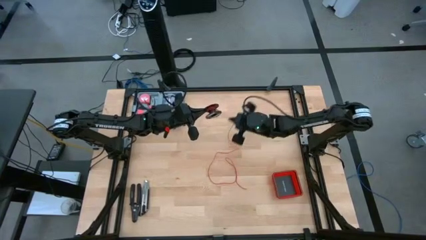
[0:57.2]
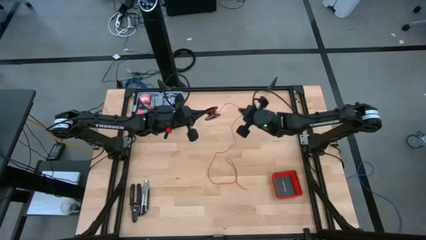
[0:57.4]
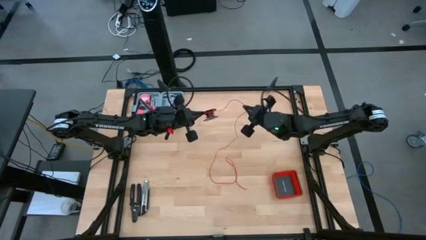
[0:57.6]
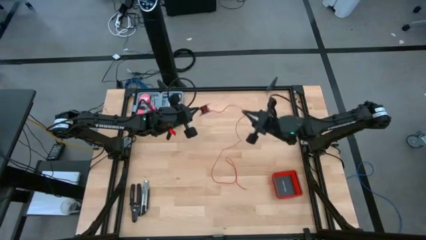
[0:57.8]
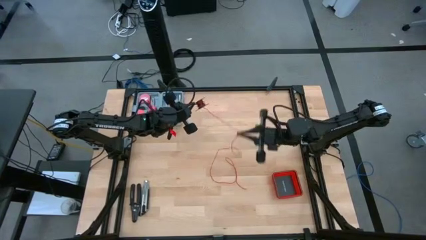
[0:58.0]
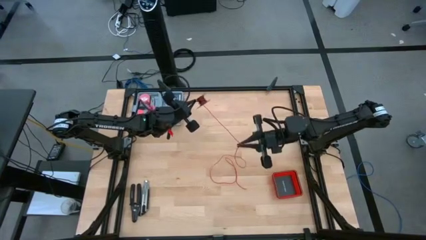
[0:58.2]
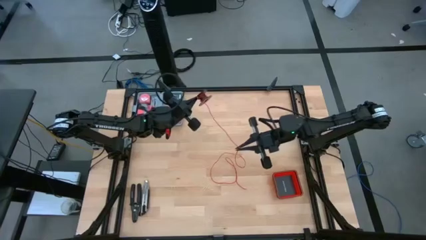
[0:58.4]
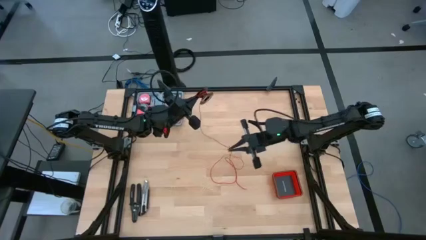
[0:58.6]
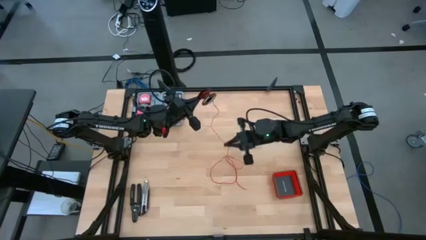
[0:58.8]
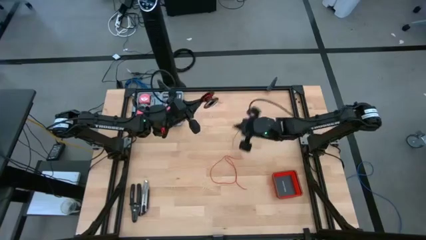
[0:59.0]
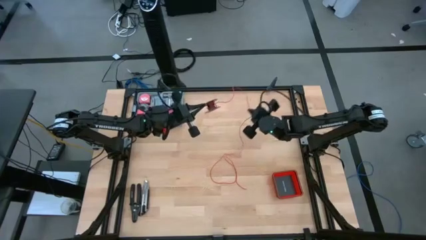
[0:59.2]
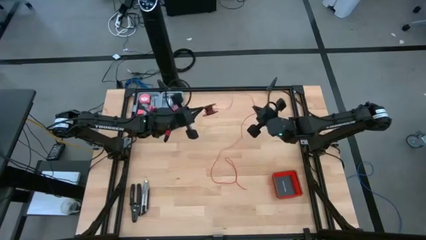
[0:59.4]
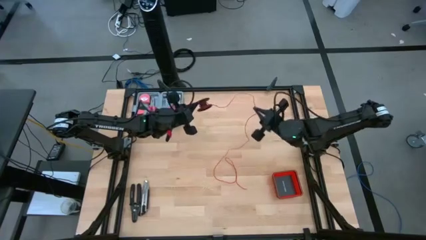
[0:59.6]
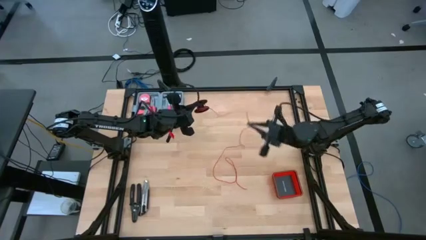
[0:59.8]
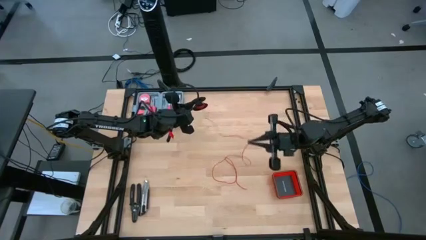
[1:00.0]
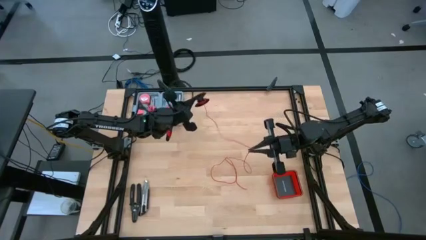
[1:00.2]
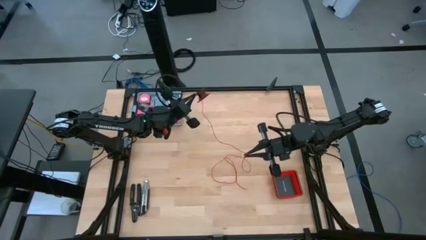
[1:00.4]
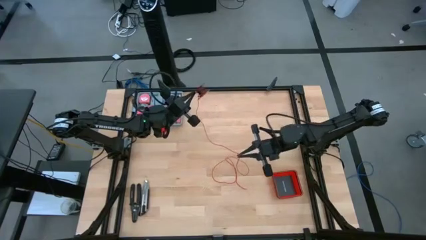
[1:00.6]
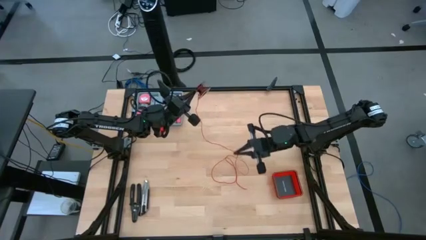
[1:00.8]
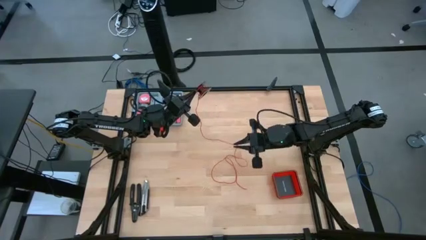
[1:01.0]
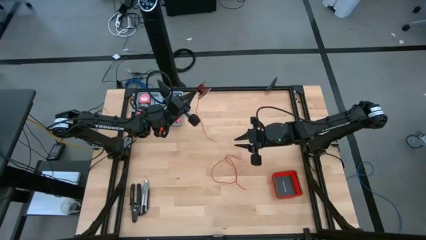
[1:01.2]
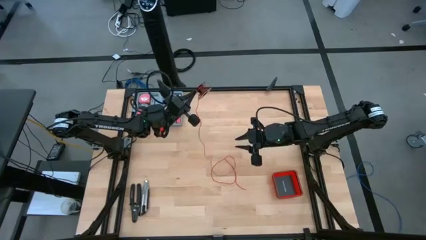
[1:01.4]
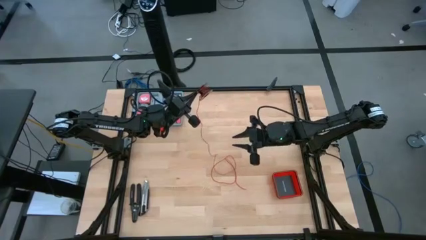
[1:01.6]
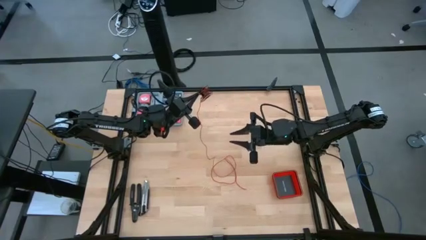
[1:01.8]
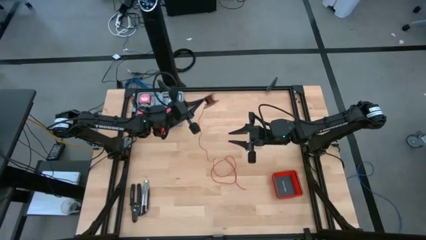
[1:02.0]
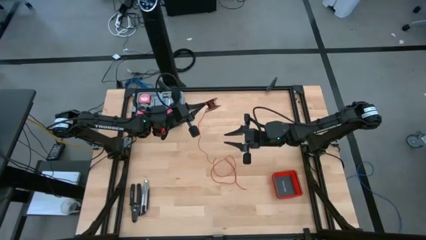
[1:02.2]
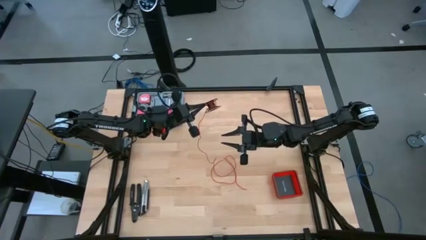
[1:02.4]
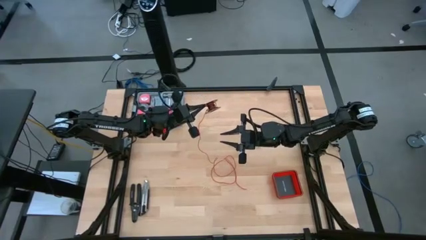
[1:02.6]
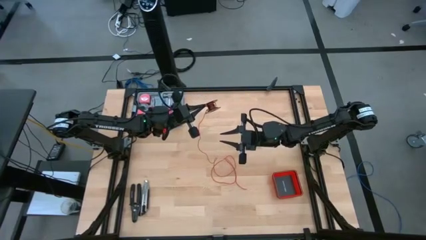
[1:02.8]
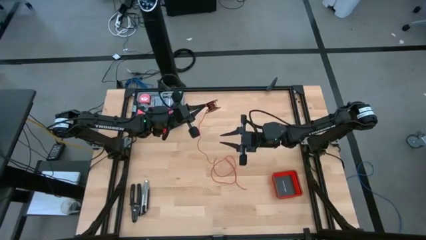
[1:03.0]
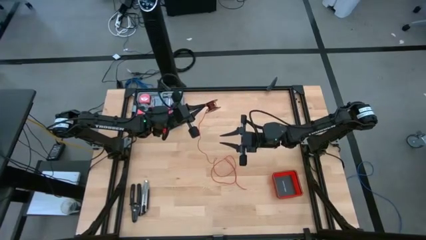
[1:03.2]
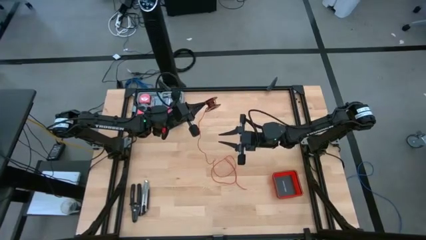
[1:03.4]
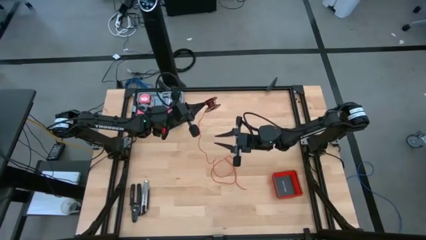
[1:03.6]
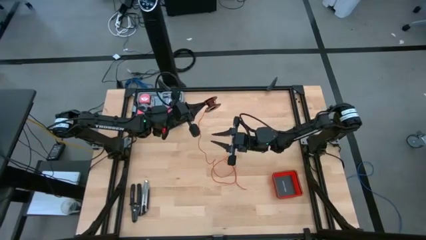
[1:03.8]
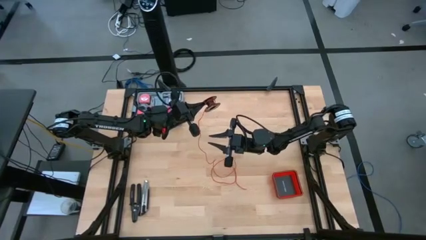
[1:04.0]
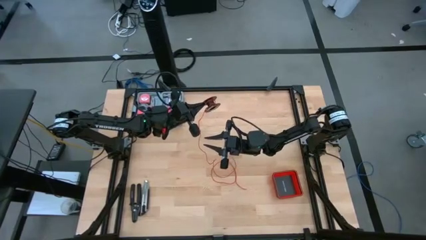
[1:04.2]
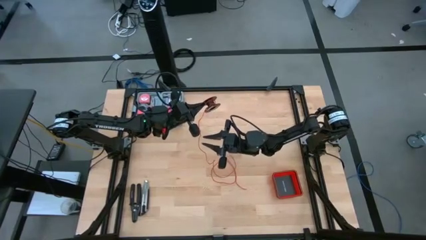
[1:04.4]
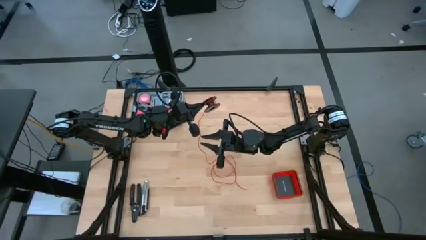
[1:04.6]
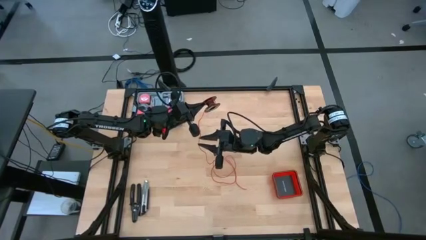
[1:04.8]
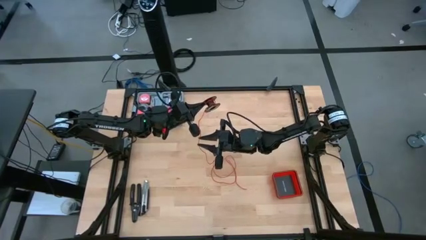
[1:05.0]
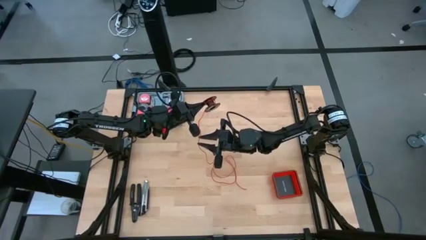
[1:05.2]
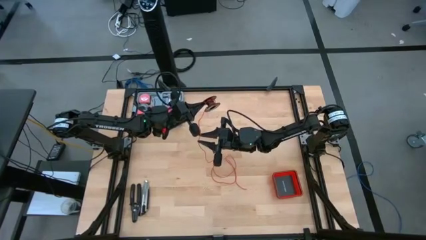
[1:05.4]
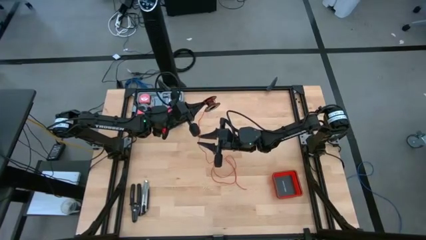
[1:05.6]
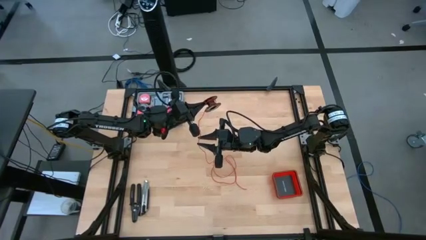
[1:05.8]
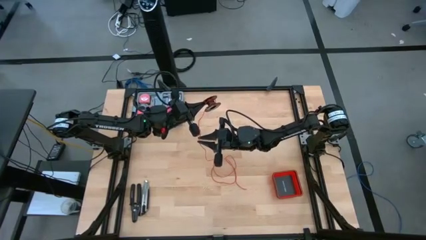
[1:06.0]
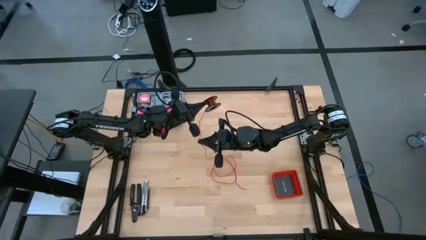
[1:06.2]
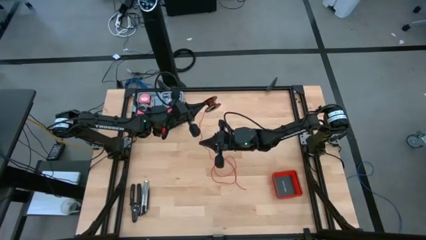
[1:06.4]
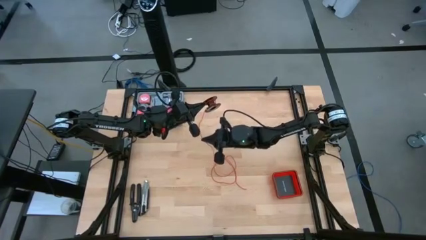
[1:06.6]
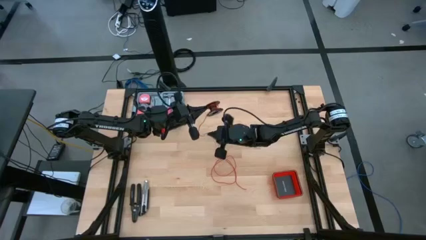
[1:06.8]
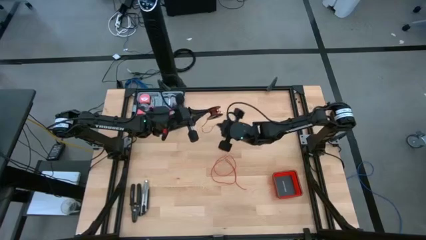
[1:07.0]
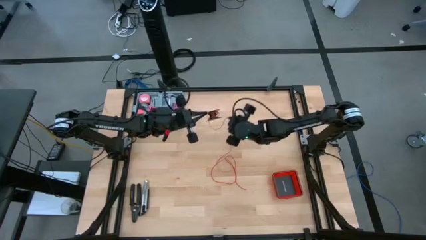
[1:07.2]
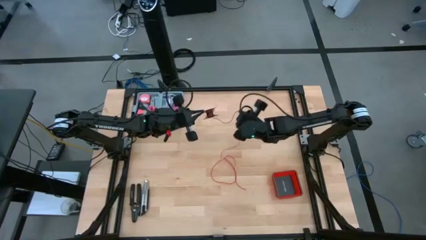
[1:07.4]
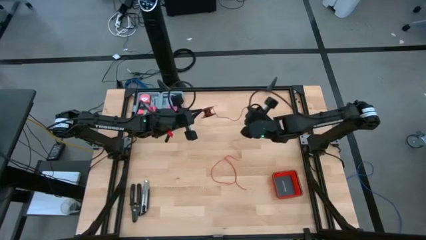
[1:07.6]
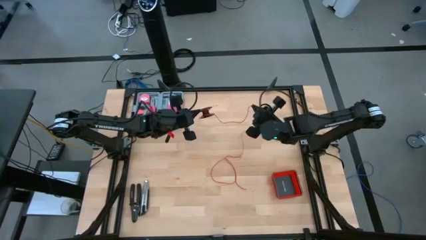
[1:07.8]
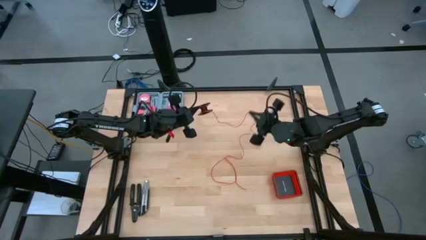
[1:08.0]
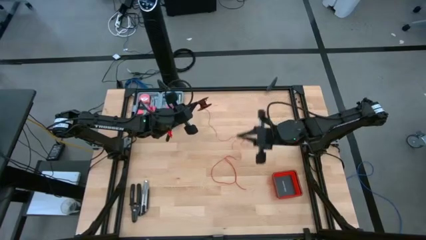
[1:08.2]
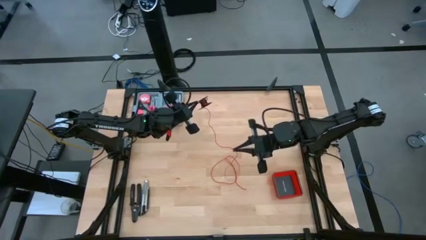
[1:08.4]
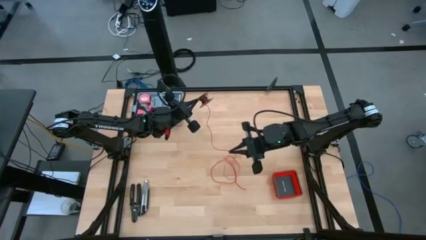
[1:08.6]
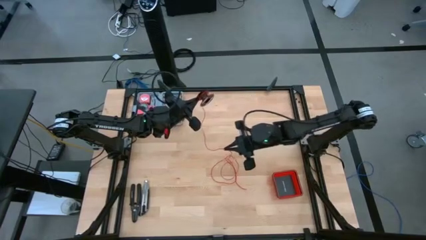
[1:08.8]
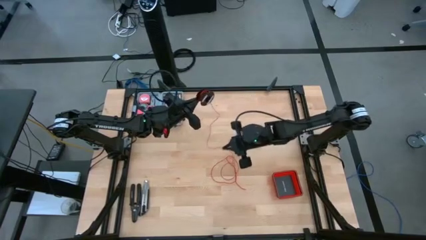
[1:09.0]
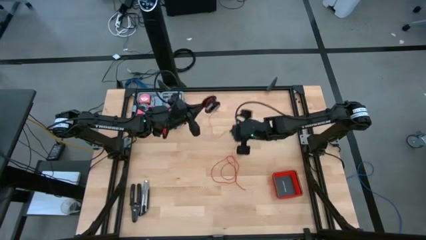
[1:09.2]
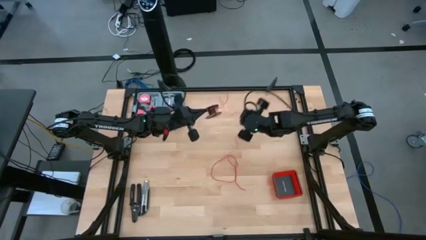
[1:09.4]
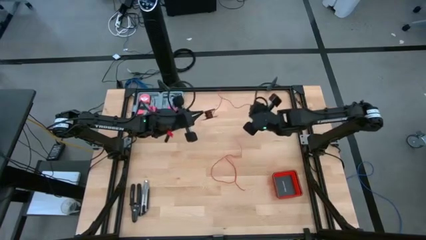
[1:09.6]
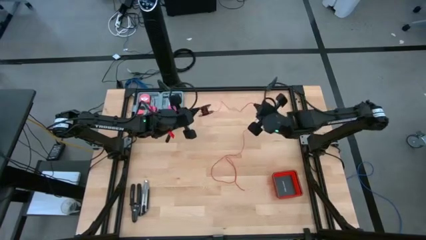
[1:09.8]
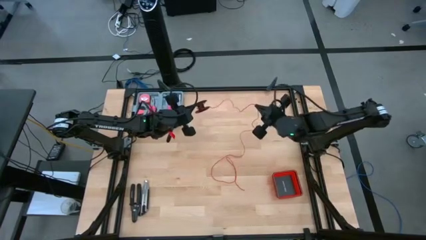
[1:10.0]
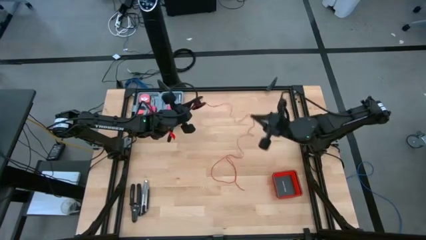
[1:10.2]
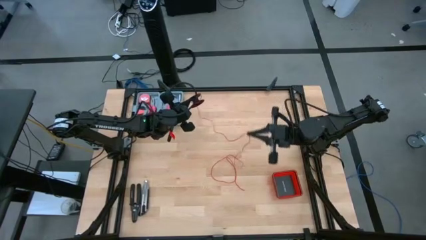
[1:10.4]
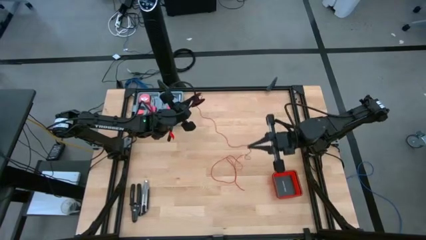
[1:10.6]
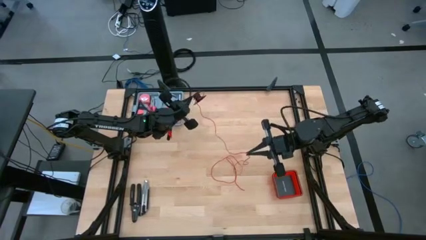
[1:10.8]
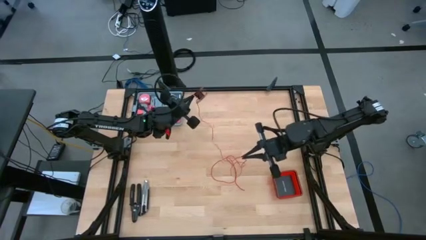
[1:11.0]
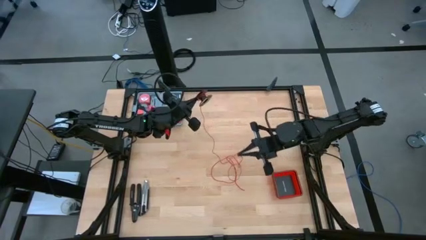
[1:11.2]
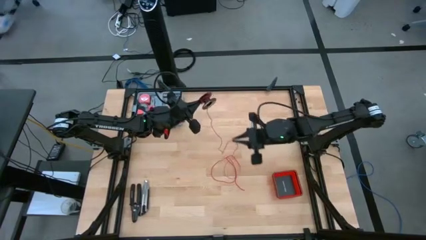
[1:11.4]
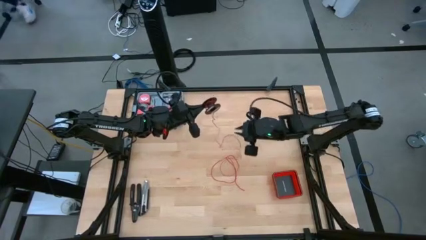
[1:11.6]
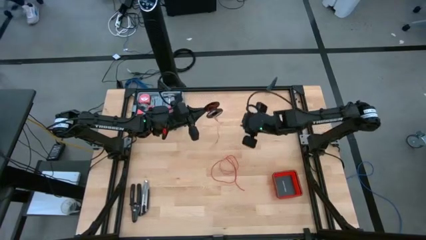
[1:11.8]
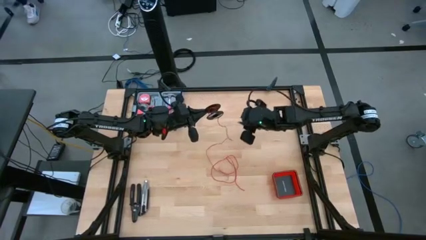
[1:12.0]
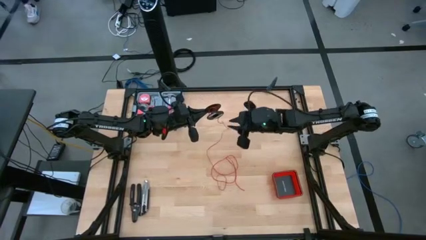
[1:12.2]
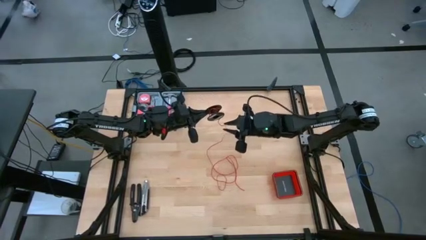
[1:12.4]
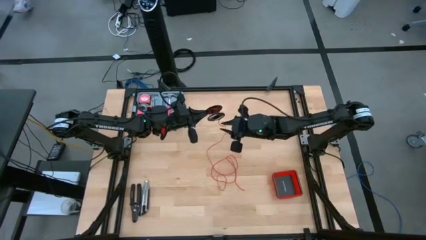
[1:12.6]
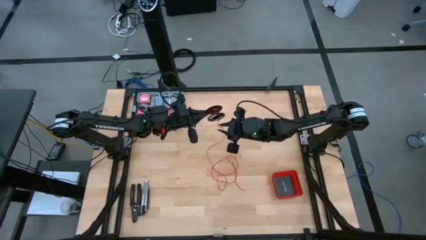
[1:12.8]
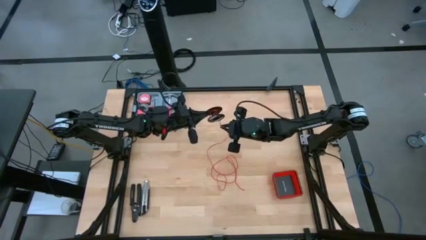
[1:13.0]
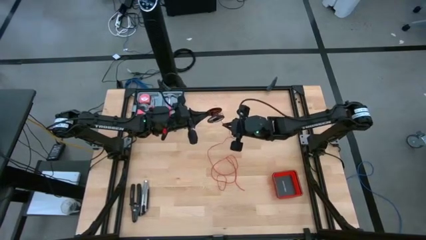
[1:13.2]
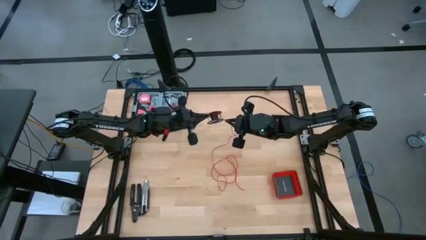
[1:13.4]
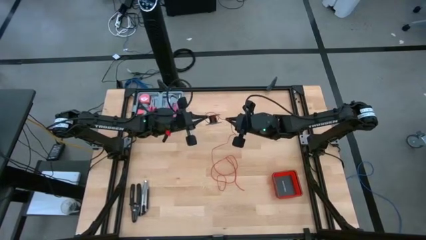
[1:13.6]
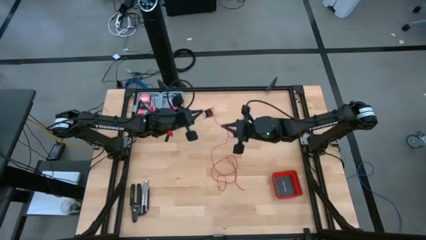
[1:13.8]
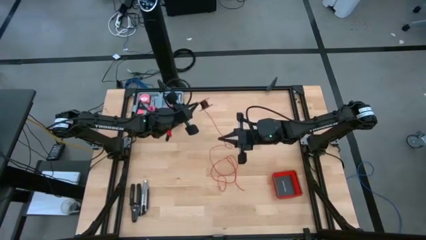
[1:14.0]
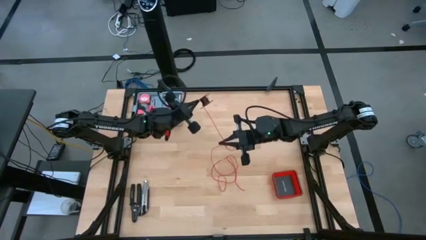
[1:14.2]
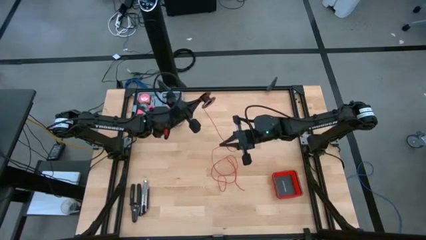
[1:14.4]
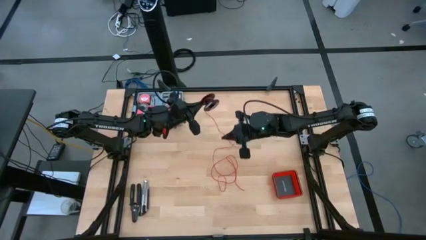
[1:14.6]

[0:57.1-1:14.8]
Task: Coil cords
Uncoil the red wire from the spool
